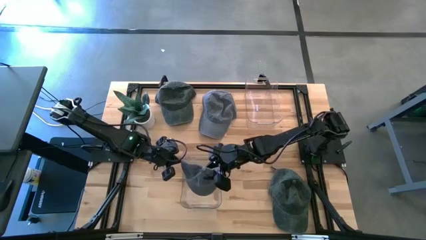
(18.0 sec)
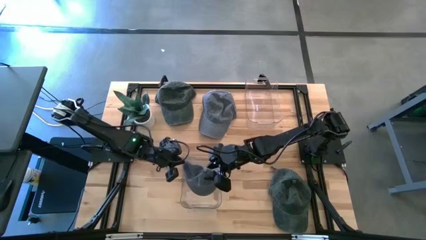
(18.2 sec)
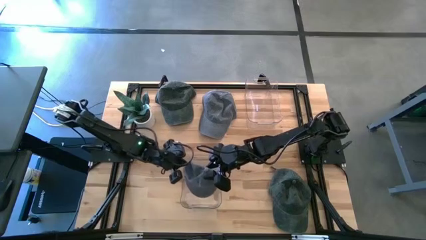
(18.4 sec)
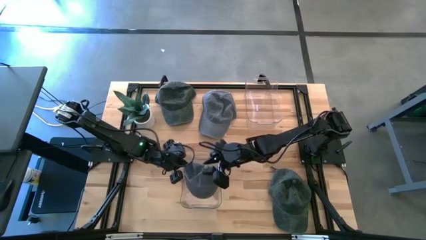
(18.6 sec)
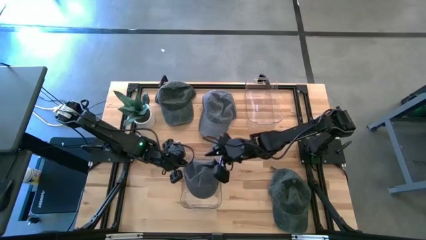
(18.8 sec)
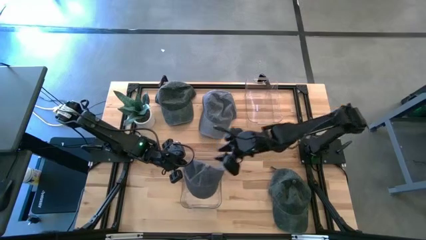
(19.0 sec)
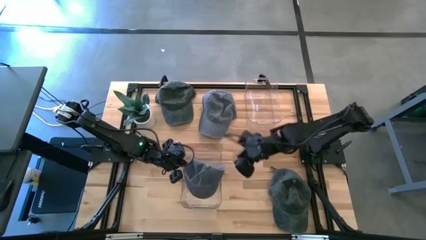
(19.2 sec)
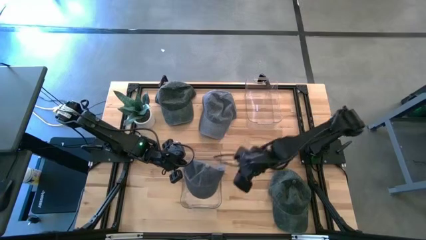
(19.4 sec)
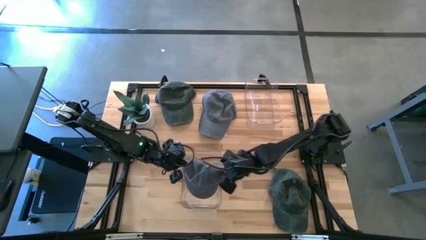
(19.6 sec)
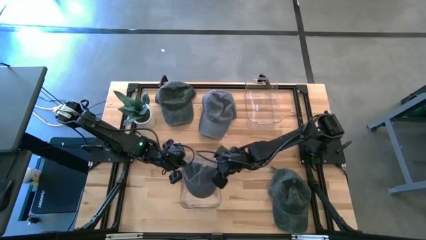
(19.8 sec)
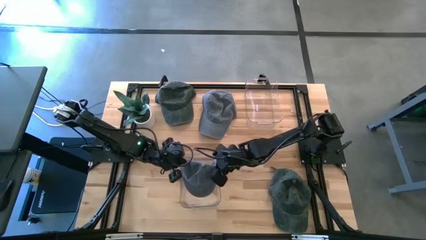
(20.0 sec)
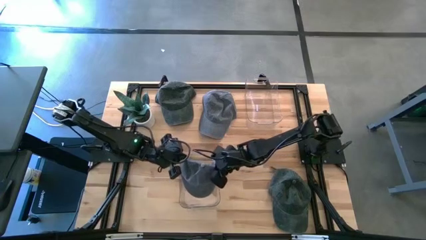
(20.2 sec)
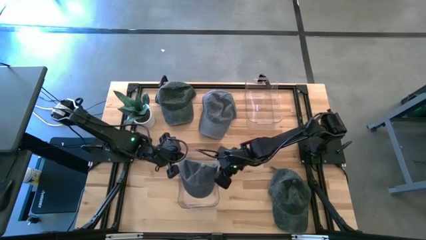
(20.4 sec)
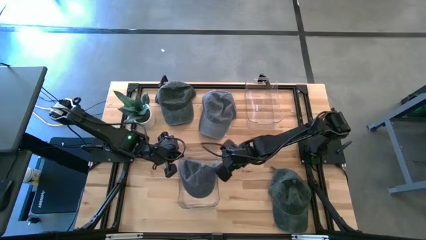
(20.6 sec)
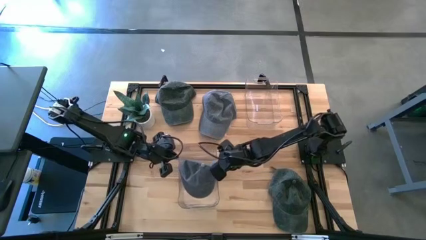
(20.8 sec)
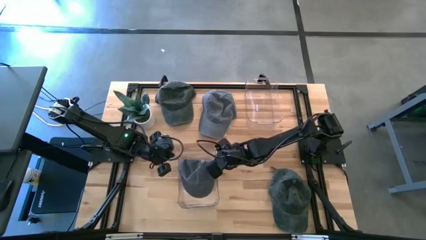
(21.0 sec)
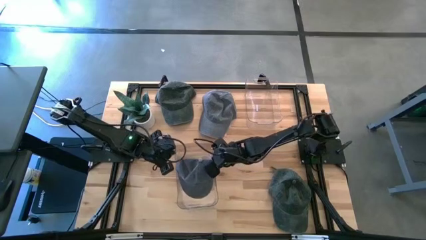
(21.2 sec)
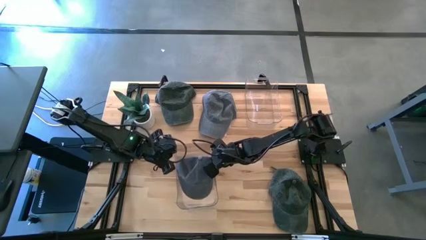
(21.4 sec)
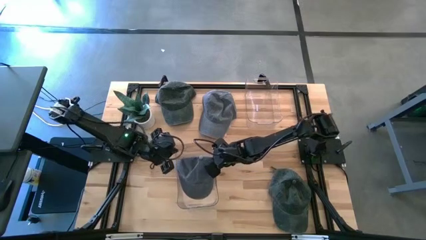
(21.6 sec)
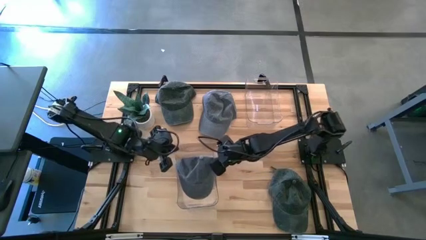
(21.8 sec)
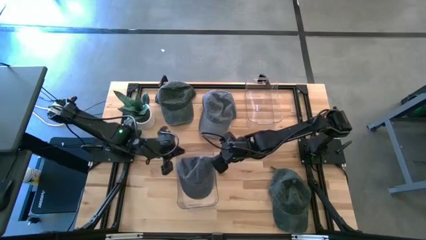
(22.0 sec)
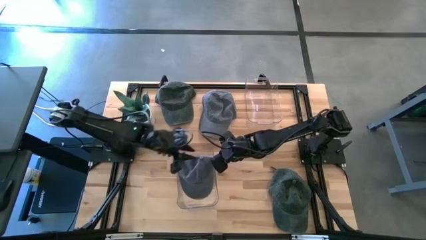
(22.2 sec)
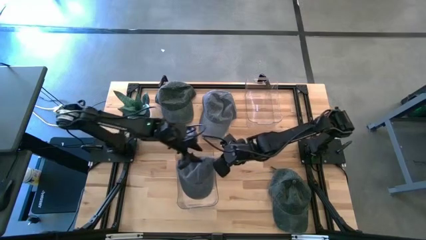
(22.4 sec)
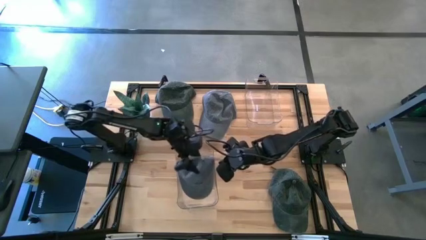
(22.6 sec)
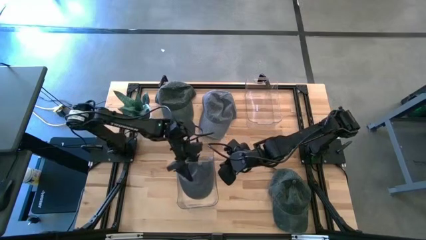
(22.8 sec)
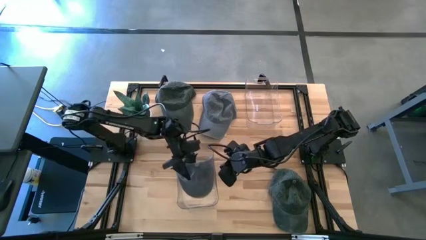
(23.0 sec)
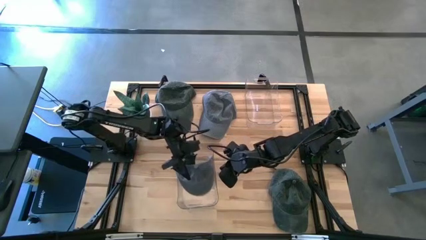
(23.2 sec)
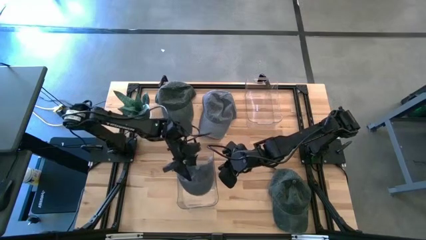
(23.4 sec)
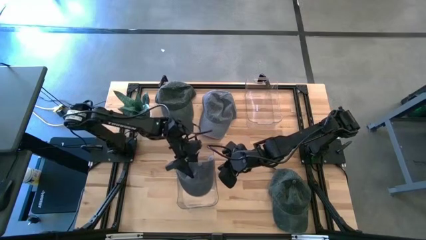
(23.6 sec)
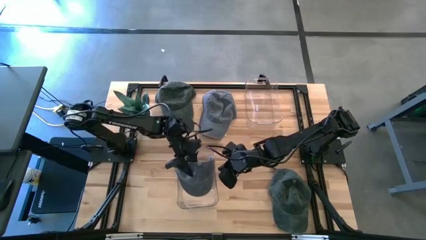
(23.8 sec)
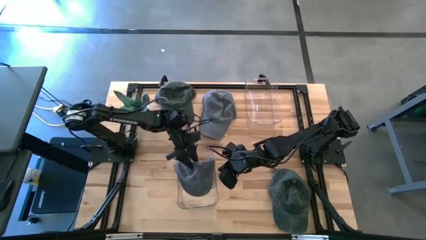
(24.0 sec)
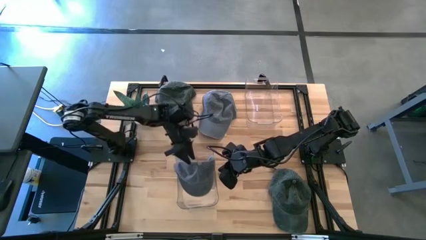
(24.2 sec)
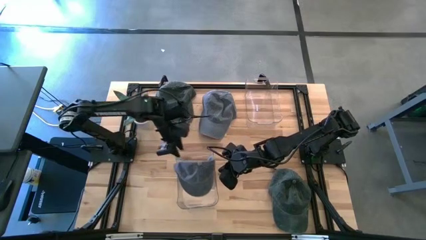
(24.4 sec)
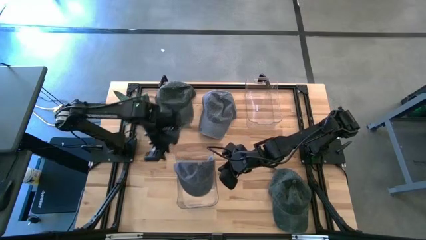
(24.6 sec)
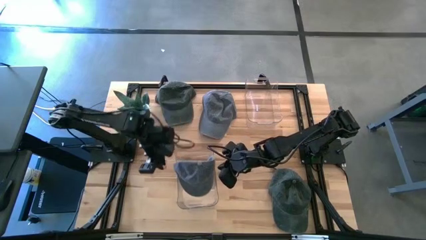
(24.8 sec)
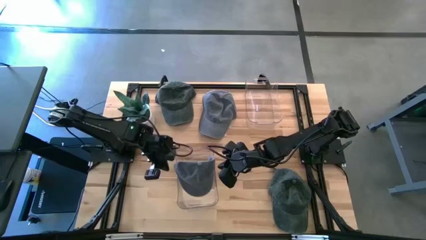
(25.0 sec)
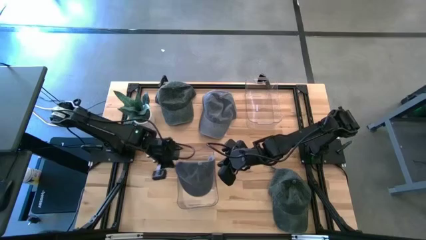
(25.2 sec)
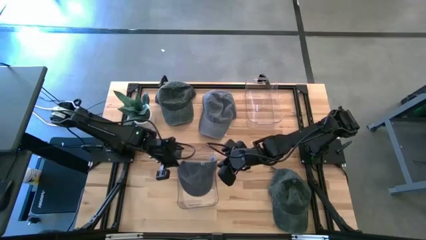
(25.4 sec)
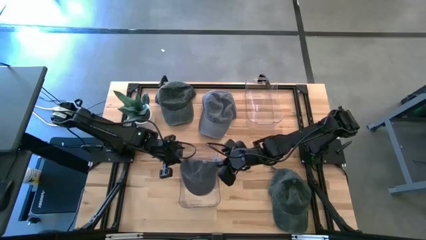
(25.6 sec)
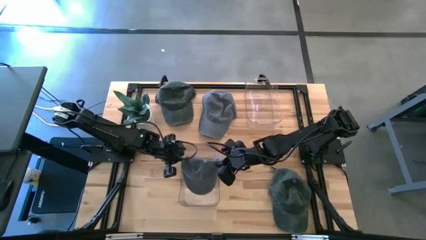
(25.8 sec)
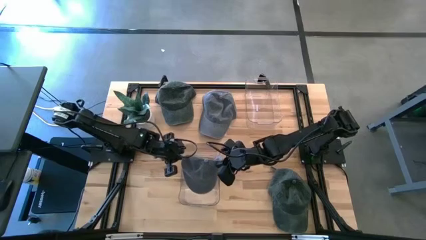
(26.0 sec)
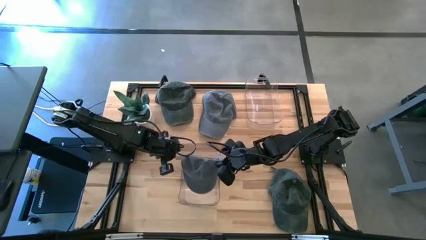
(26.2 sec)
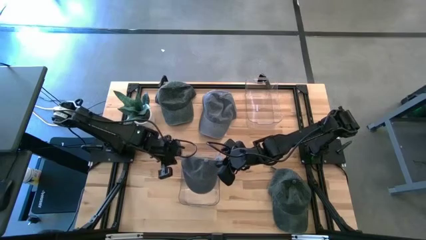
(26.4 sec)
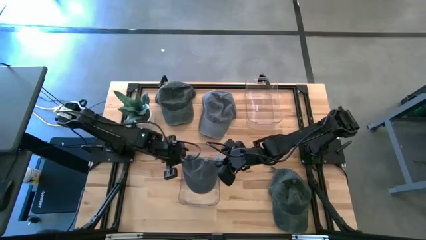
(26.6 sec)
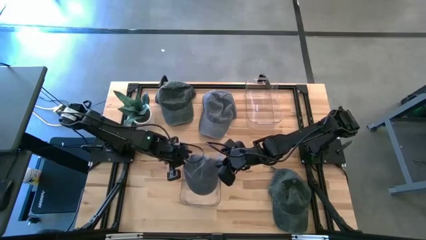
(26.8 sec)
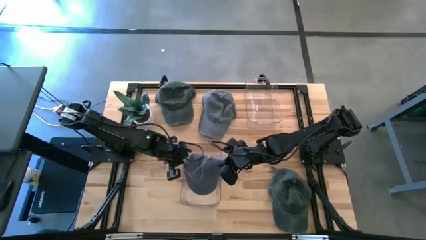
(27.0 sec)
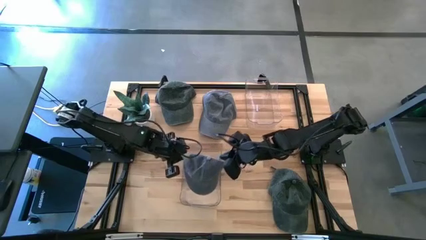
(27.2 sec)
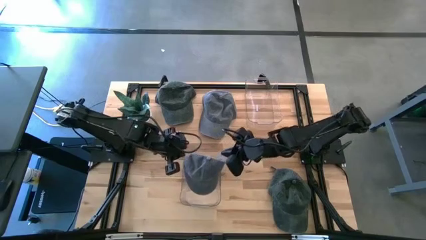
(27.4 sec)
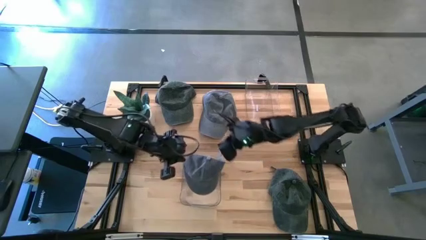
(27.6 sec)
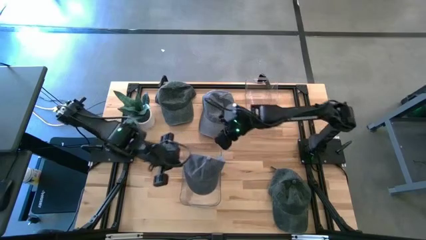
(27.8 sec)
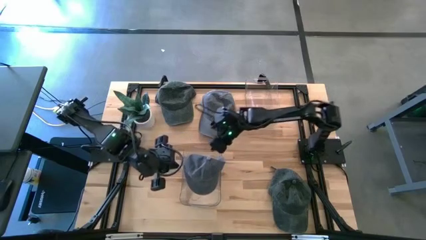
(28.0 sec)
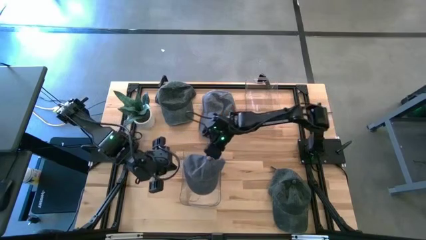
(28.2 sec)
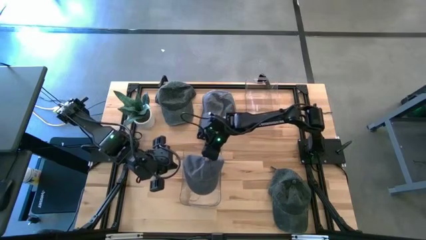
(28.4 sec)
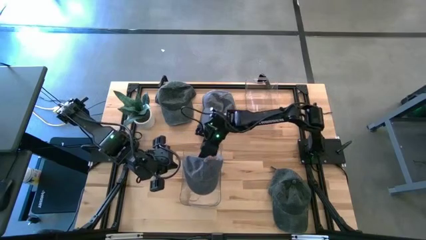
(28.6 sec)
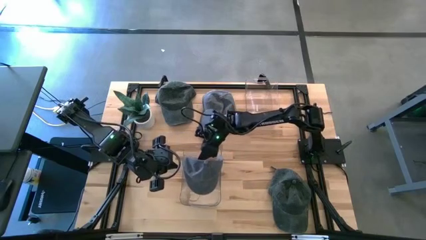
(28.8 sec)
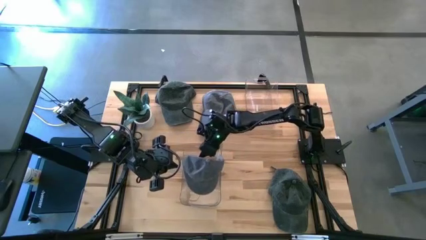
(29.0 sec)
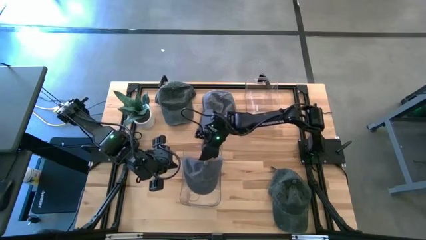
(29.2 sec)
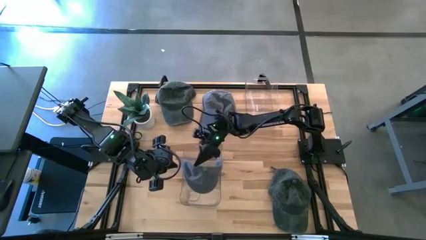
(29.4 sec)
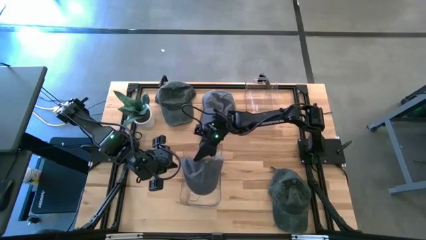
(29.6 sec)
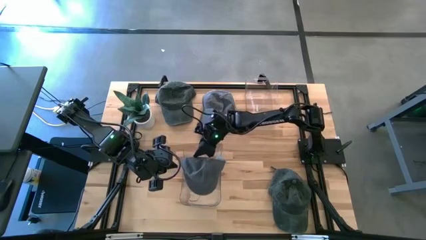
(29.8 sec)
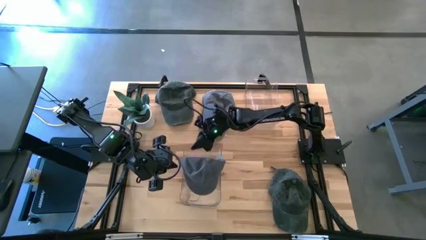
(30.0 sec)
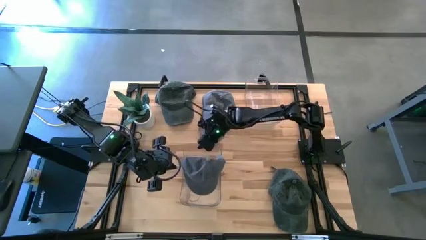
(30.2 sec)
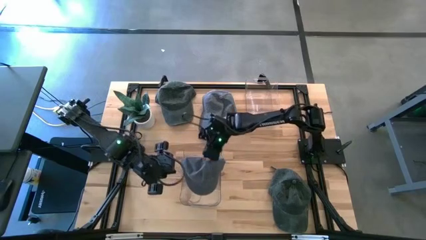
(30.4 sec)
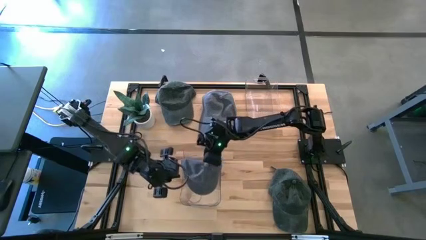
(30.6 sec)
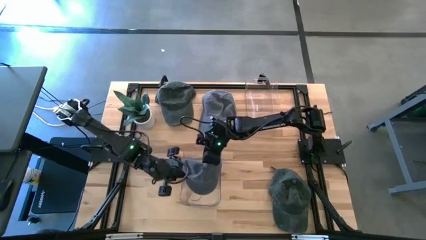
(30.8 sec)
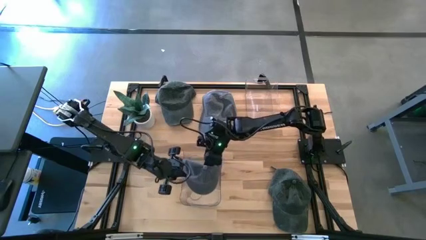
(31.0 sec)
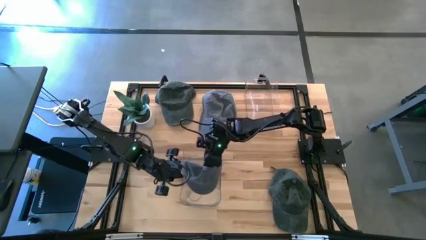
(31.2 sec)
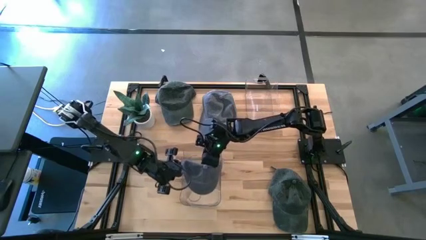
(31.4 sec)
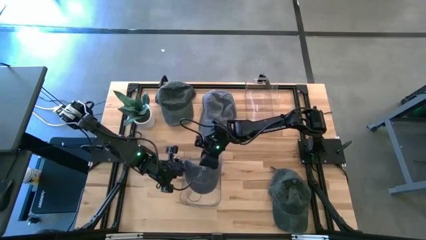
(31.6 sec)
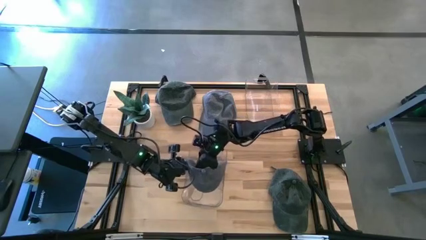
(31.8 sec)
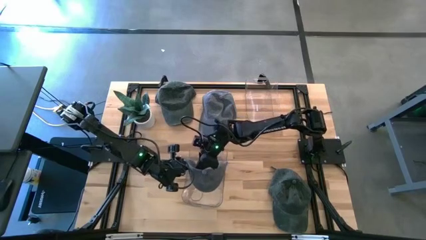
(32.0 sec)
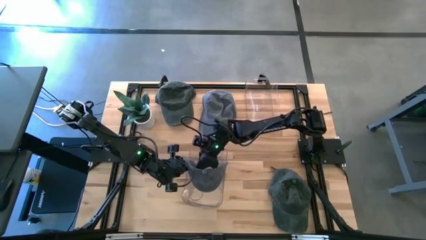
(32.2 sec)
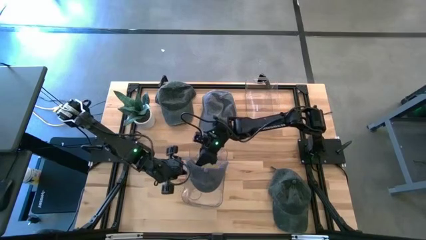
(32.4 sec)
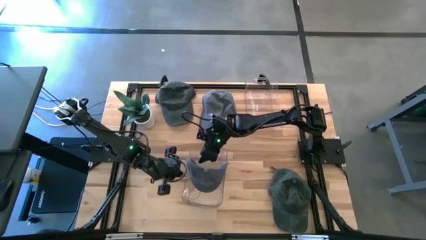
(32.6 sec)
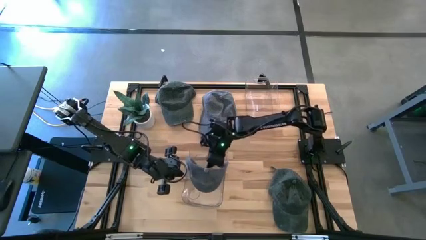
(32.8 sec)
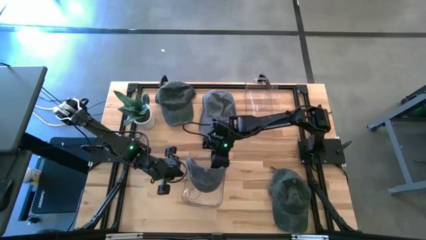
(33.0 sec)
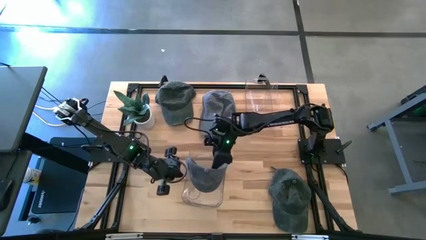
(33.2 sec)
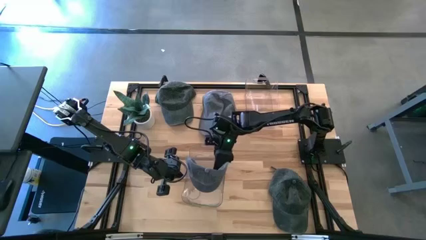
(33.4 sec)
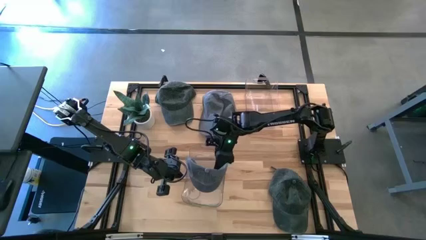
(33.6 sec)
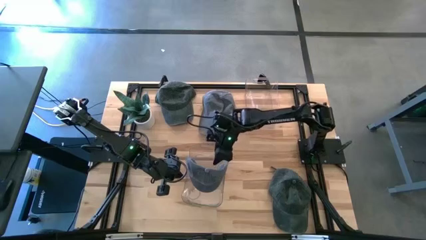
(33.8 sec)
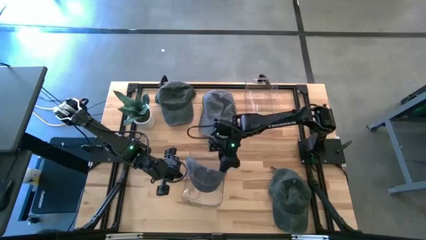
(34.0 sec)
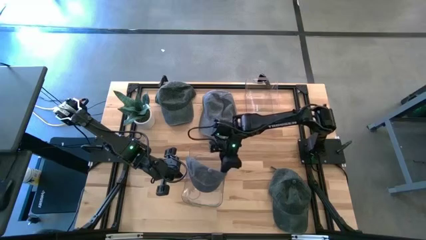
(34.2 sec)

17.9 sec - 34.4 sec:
Task: Pick & Place hat
Put the bottom gray cap into the bottom transparent bin
